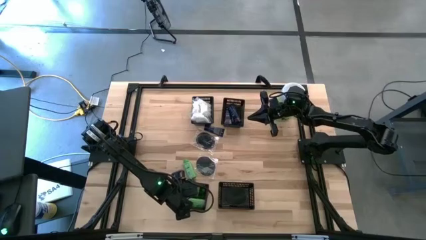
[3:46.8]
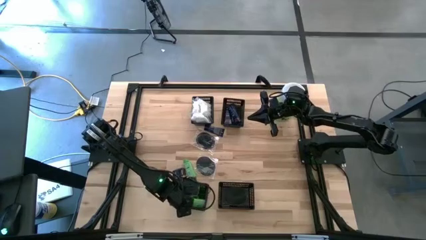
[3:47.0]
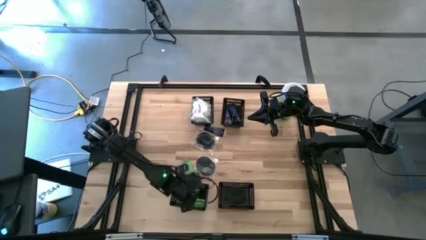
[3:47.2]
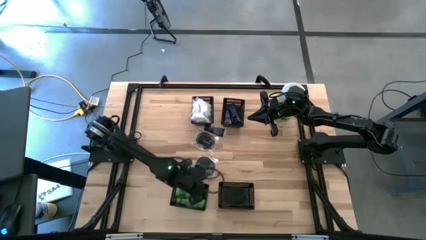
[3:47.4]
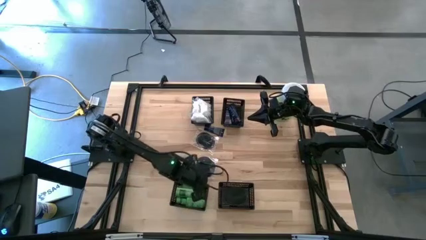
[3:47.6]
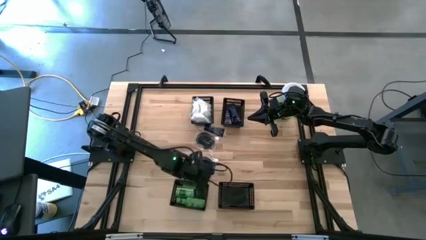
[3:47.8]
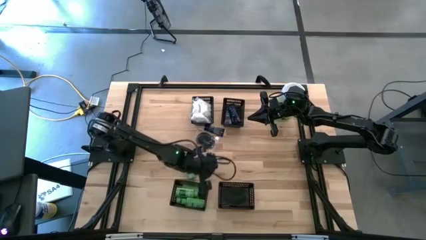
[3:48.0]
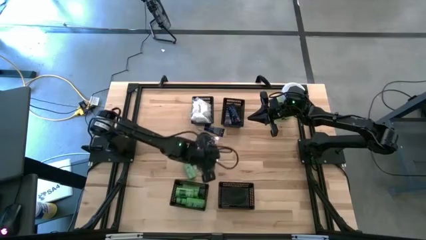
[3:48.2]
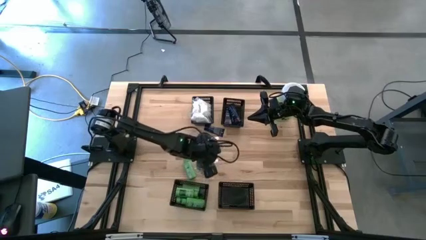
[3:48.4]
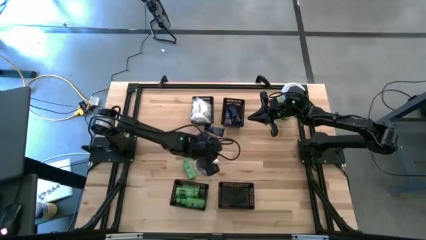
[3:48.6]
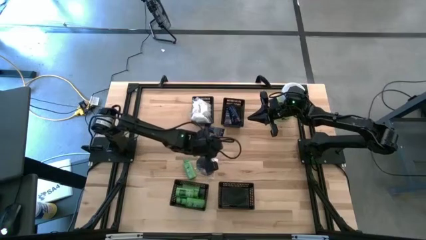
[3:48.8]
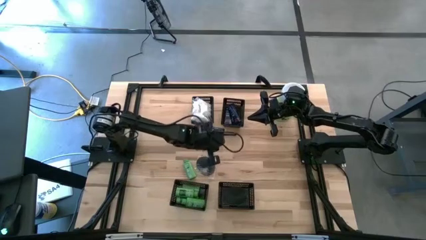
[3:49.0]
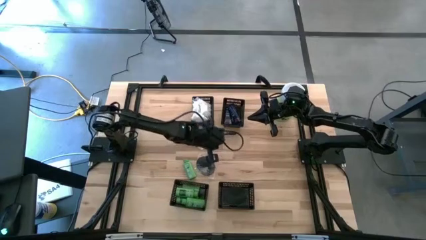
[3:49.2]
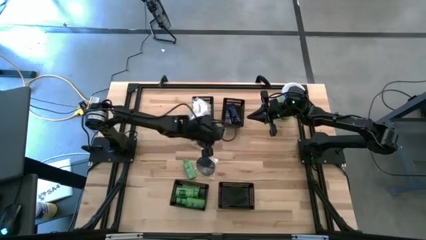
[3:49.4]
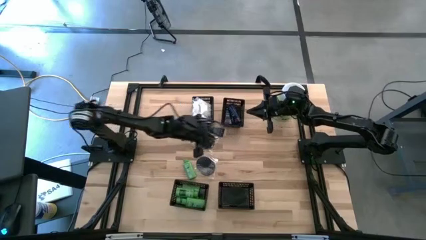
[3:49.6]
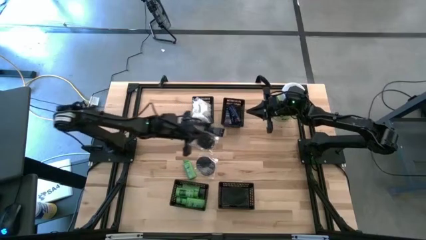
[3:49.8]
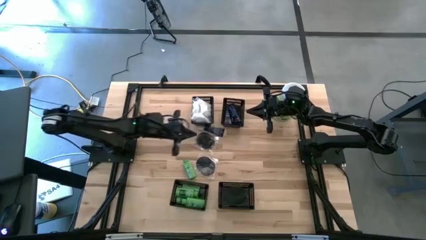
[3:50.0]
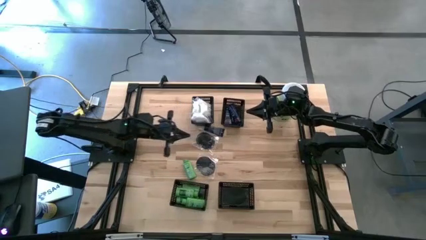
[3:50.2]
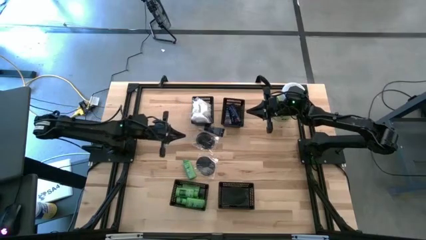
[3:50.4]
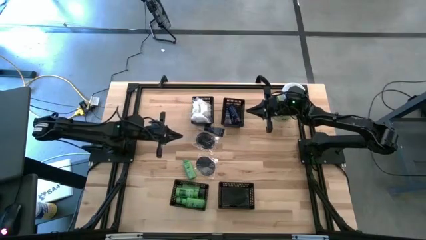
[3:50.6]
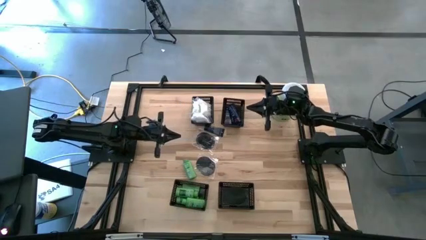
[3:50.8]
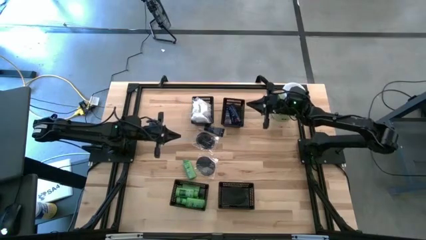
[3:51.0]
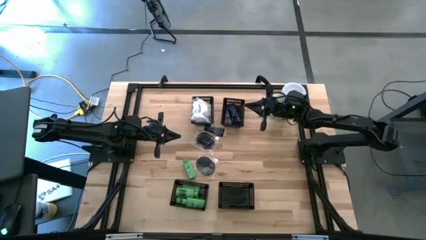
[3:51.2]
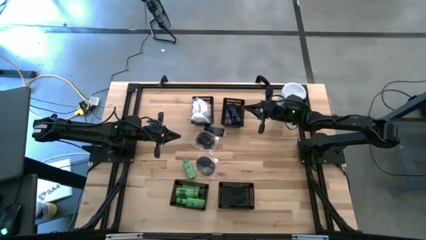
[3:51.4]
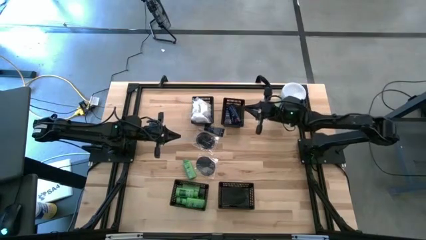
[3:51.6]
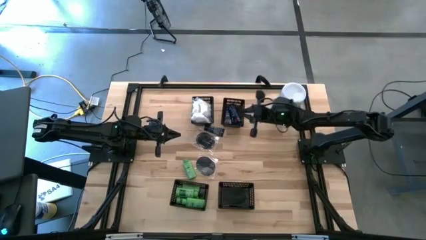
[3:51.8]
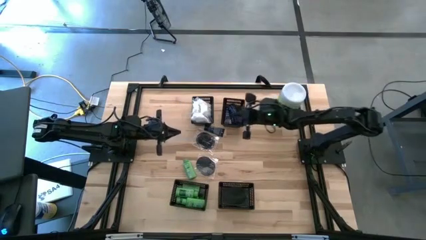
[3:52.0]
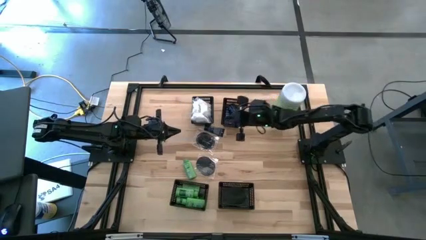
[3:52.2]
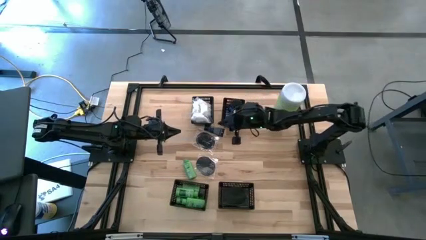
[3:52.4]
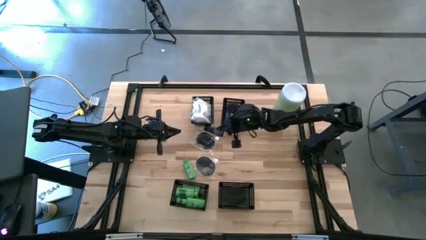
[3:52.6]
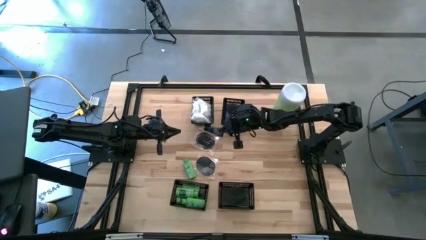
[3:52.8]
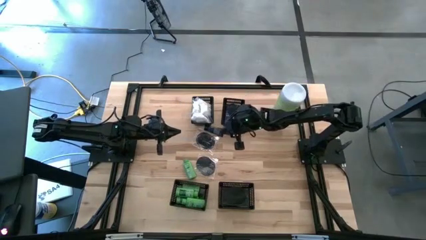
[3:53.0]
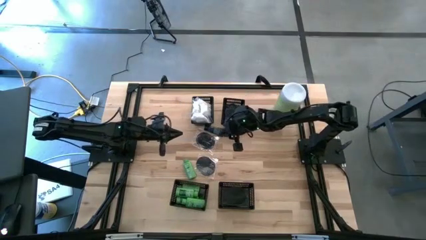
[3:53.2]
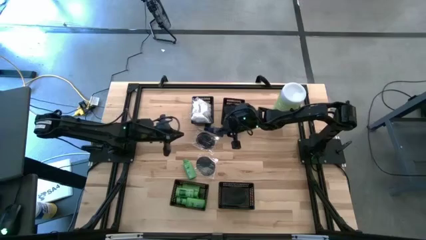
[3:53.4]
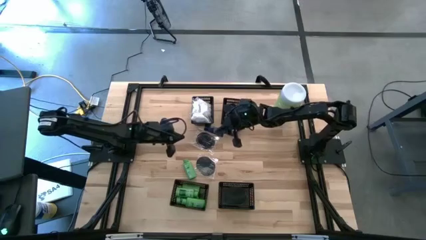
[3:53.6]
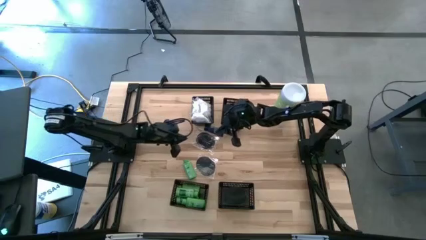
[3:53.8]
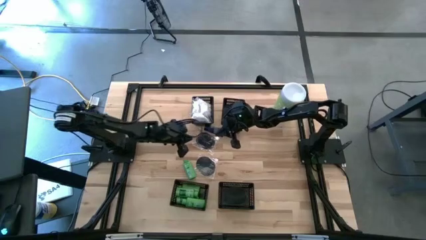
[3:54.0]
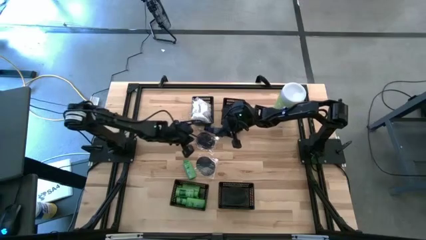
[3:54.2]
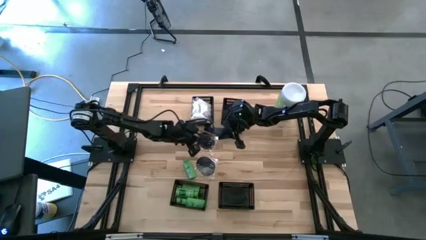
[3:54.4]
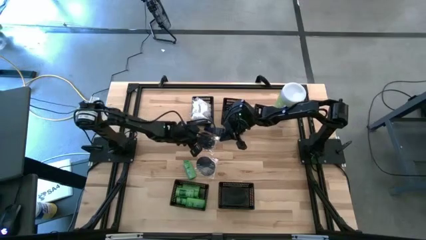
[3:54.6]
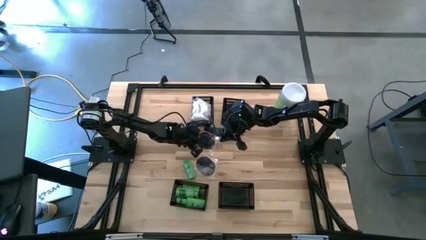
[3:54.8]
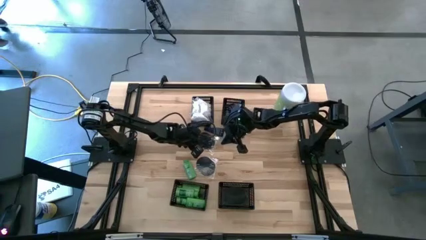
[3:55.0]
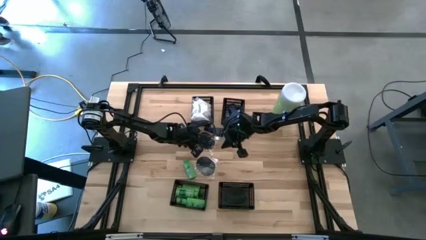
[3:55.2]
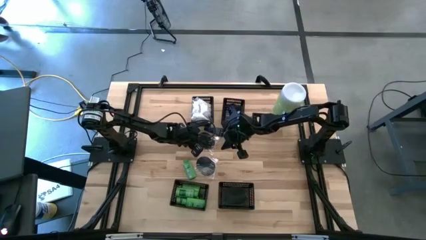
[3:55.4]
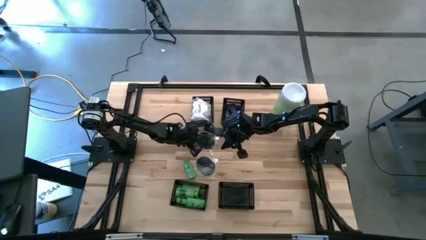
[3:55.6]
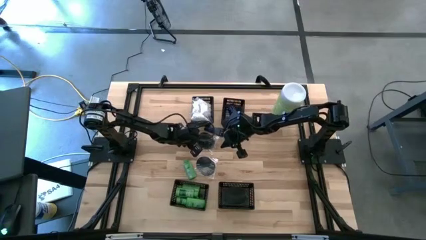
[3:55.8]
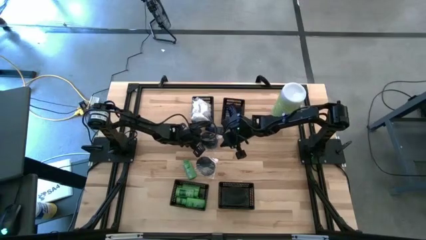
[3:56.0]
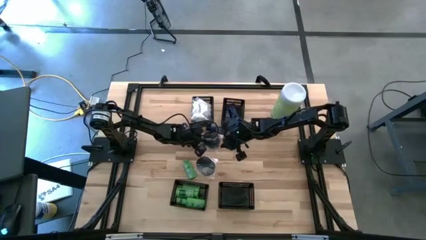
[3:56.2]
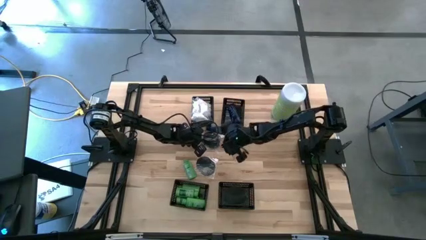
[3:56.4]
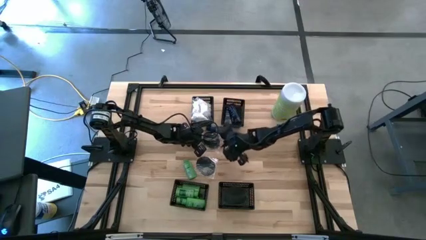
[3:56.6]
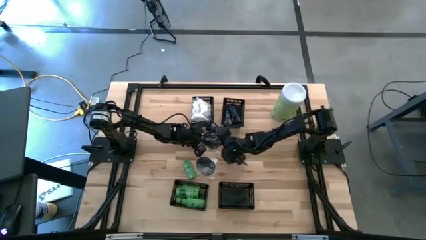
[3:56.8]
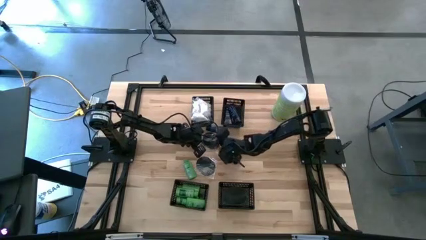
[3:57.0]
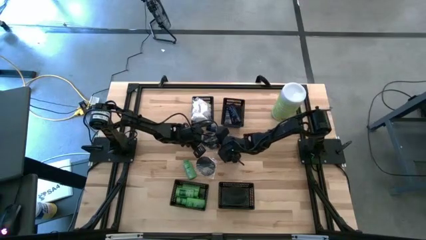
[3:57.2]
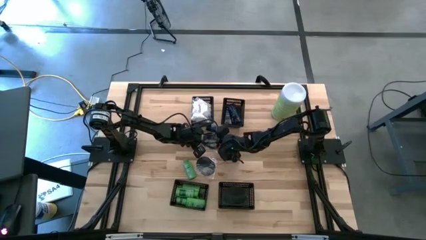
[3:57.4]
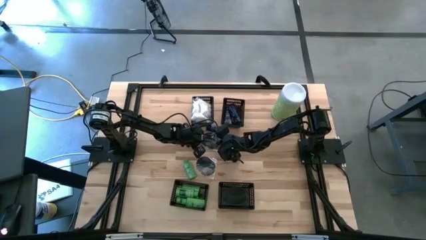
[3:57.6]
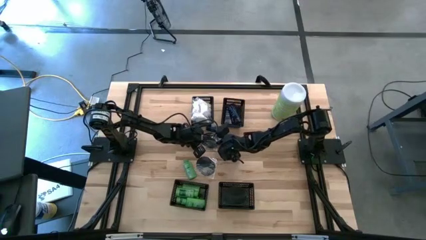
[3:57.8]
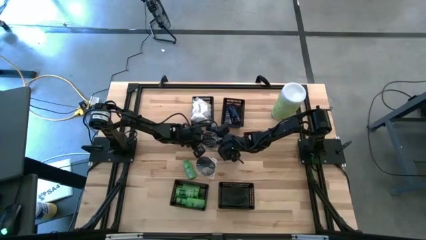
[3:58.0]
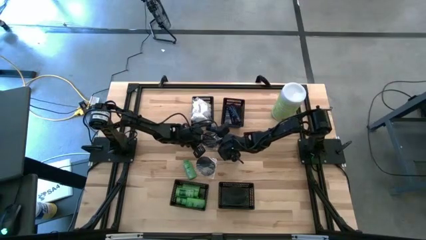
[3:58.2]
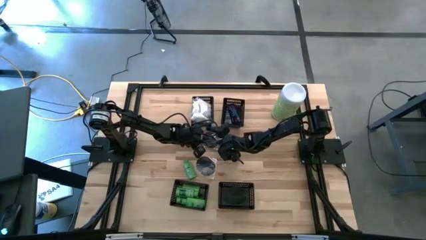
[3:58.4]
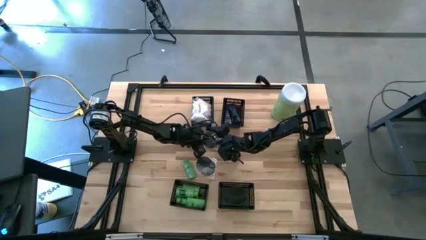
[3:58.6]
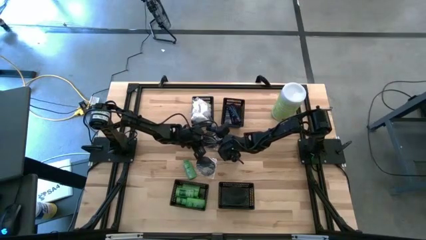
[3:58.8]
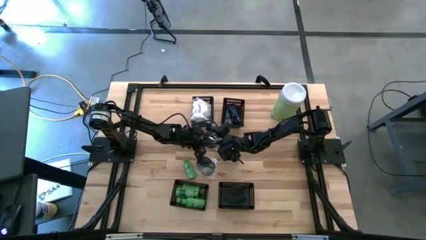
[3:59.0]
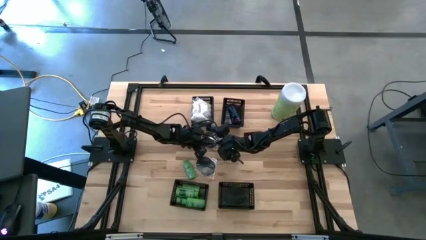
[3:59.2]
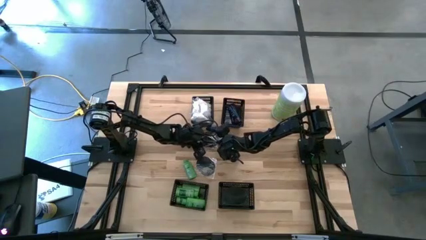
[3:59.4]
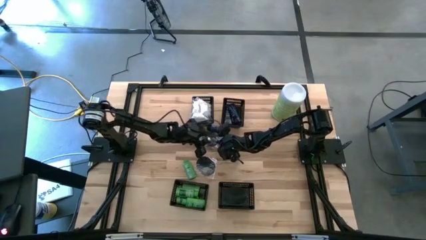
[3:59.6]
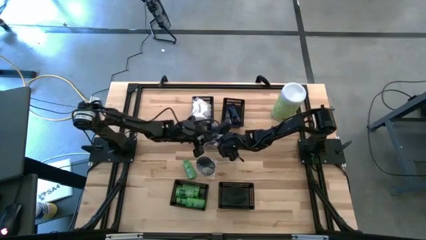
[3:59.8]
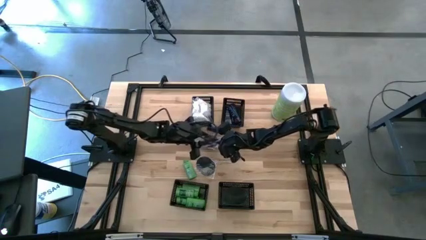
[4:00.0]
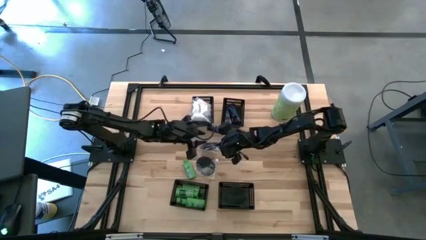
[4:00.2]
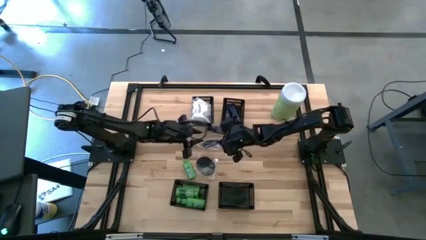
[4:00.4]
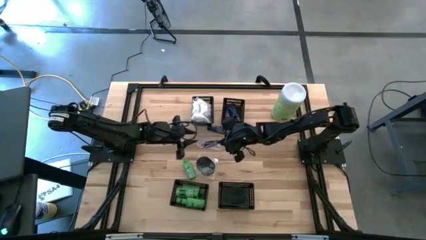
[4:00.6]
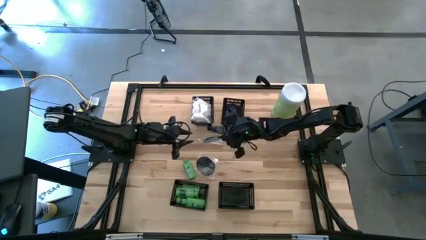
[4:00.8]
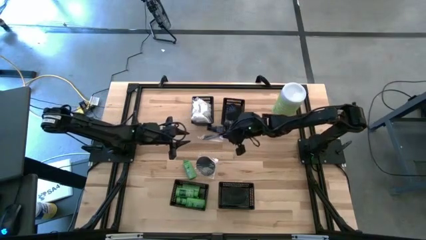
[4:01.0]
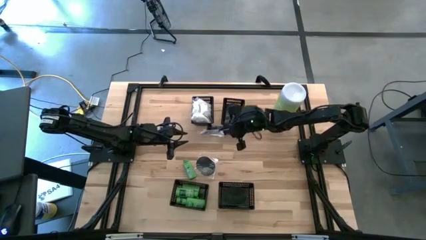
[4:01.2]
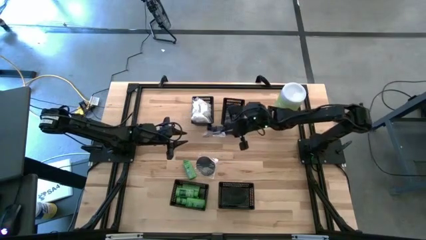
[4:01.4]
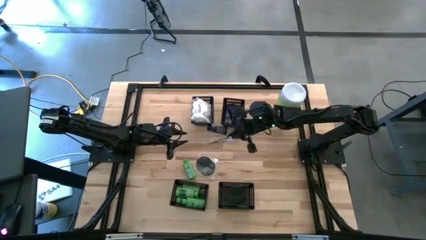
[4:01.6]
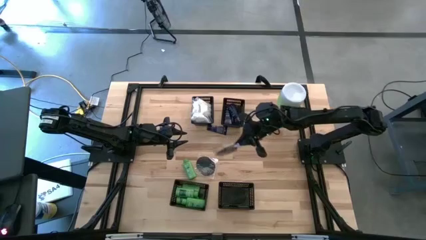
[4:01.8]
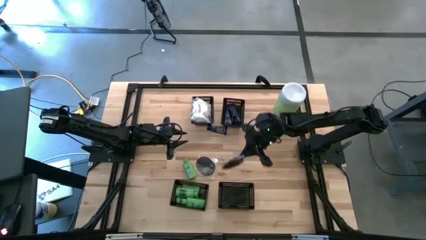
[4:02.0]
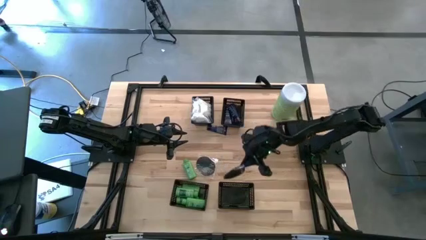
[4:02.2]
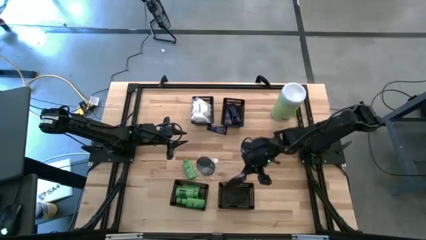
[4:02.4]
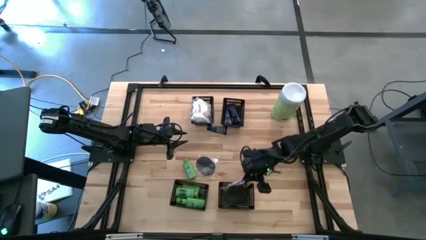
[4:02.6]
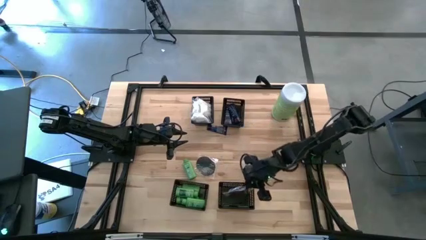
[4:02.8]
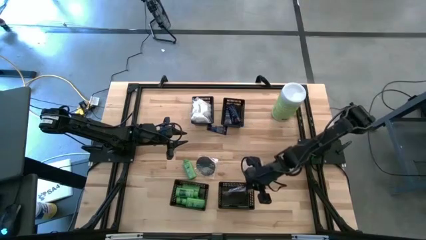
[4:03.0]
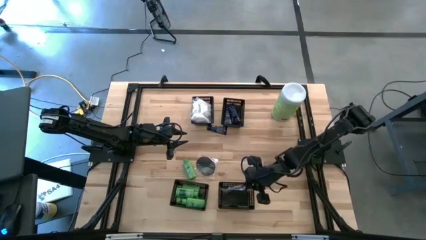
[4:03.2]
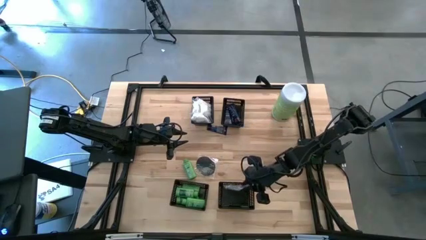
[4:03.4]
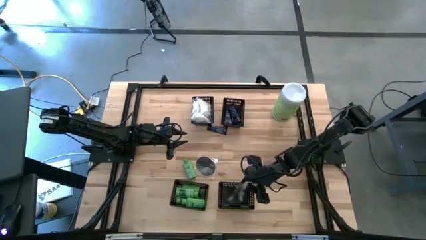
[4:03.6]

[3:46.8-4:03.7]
Task: Pick & Place Travel size toiletries
Put the black hairbrush into the bottom right black bin
